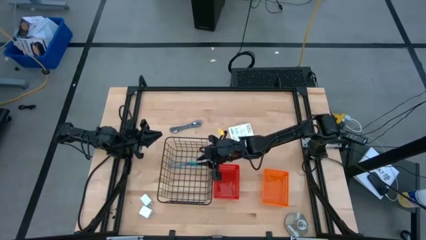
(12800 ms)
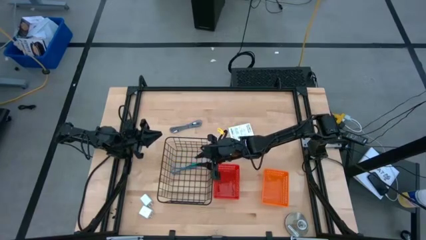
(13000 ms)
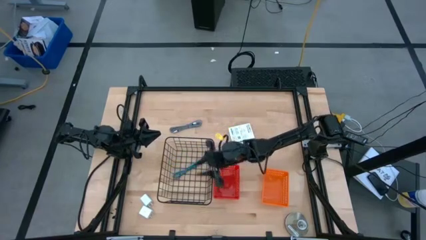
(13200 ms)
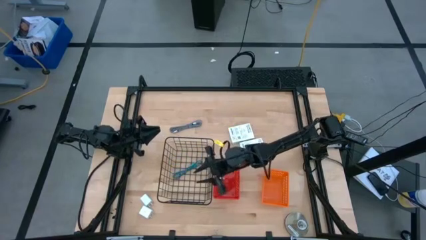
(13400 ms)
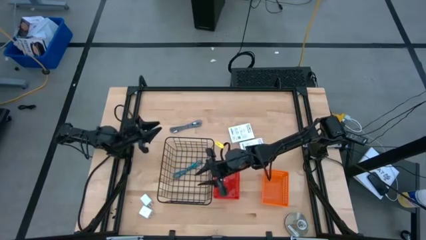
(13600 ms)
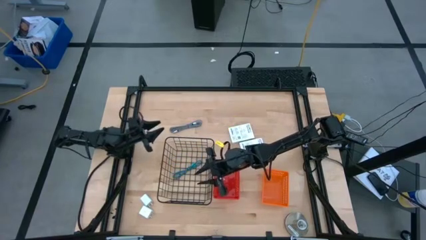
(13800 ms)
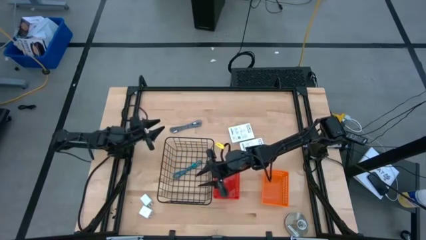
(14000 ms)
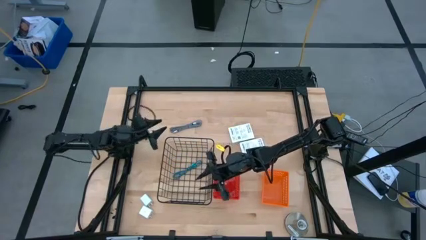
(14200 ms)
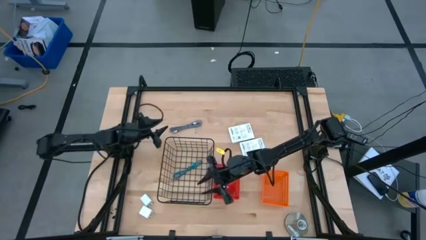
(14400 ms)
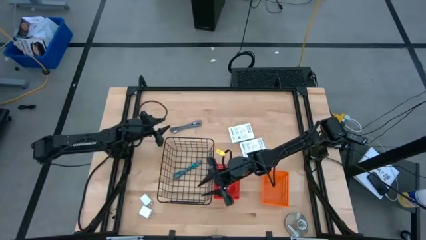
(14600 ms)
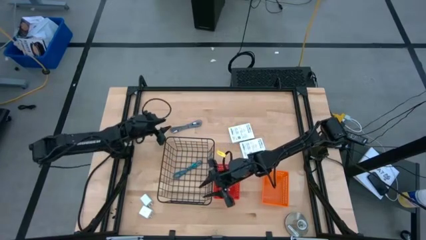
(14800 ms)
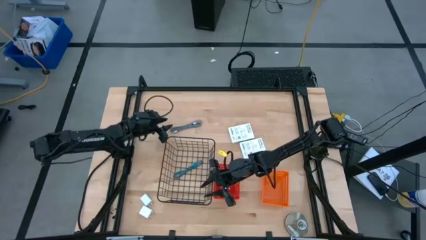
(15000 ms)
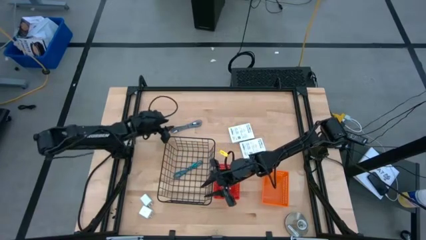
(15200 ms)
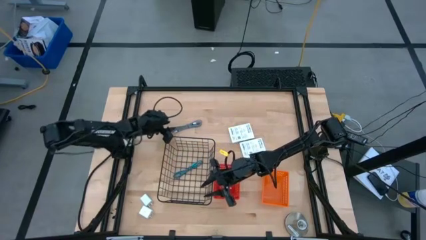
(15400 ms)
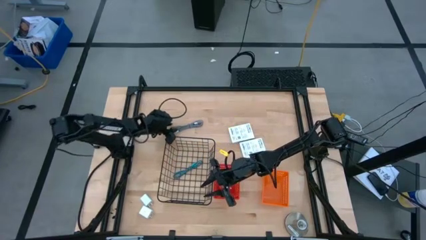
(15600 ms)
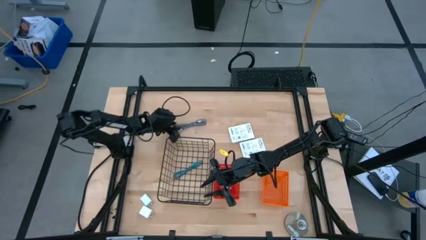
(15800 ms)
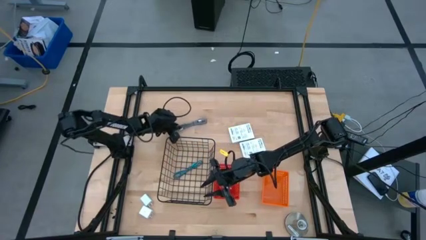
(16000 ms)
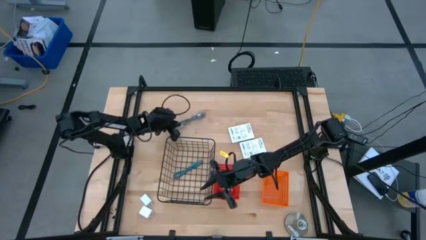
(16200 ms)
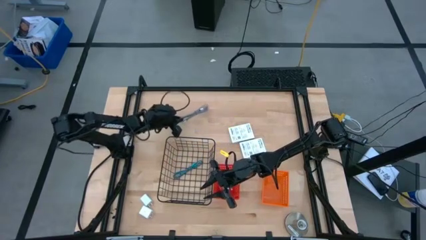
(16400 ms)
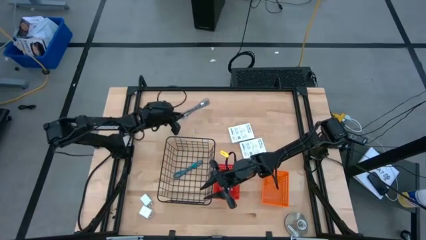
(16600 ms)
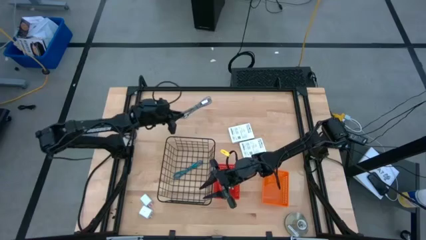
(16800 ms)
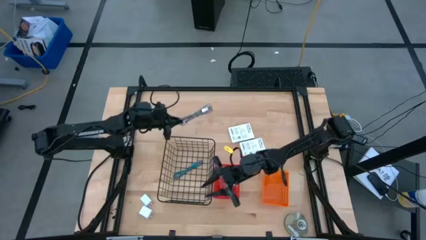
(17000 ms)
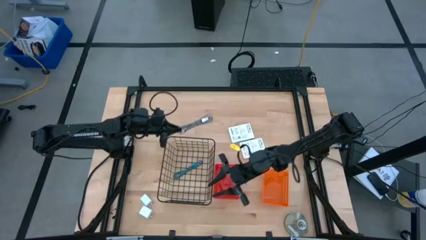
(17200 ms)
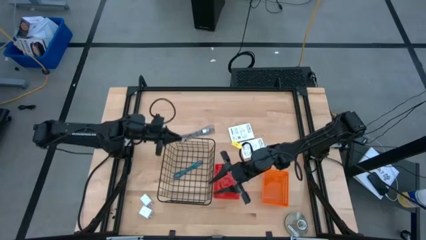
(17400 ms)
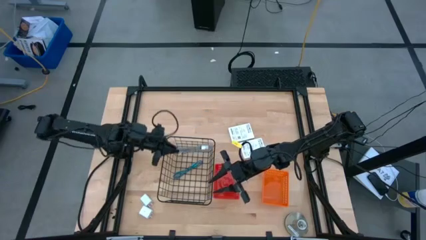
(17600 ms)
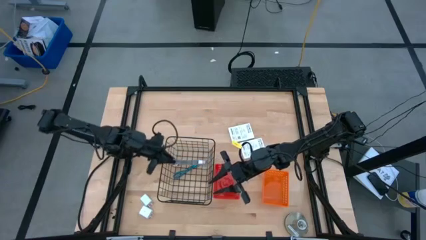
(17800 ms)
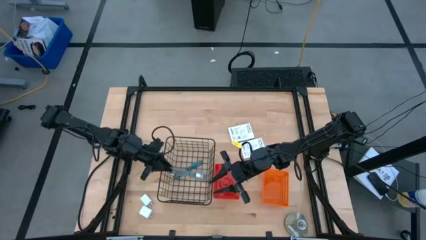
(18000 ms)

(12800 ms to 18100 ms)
Task: Pick and place items into bin
Put the gray charger cable into the wire basket

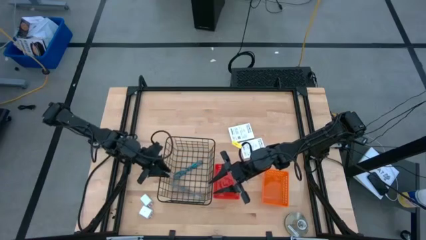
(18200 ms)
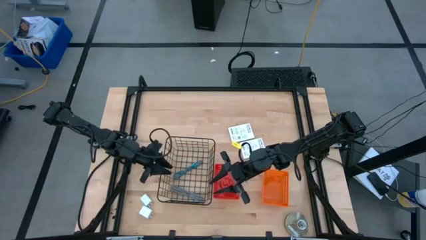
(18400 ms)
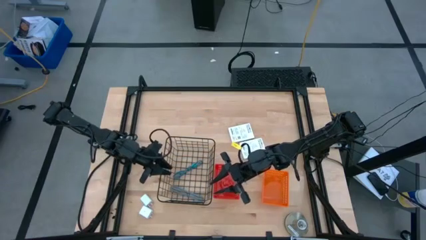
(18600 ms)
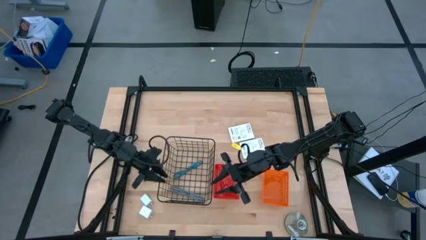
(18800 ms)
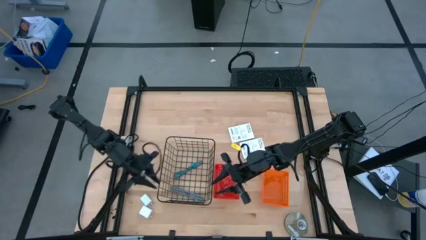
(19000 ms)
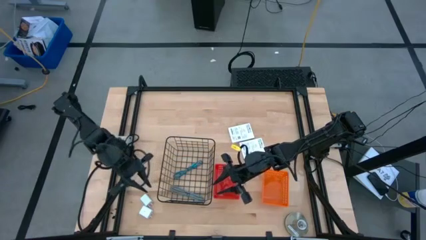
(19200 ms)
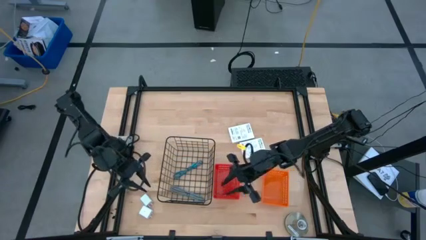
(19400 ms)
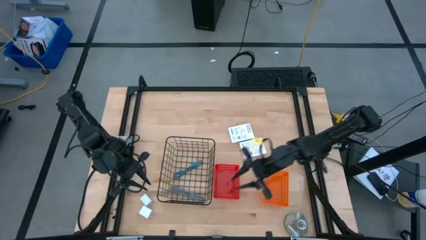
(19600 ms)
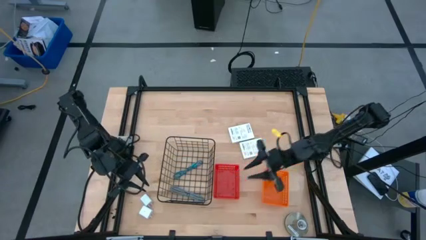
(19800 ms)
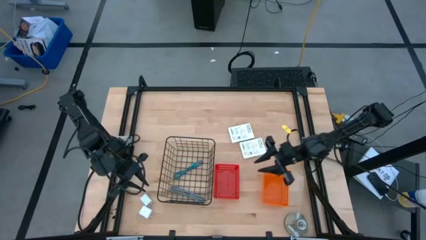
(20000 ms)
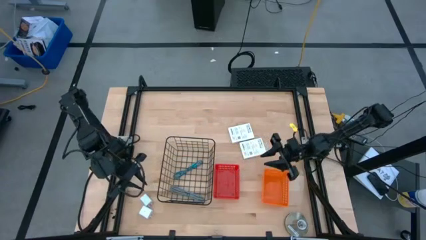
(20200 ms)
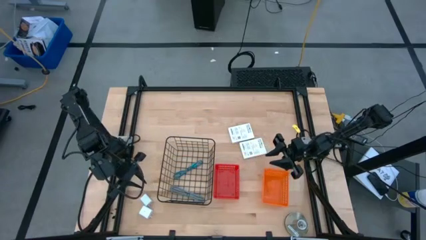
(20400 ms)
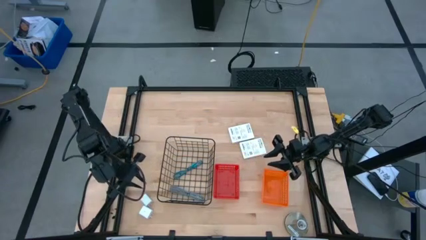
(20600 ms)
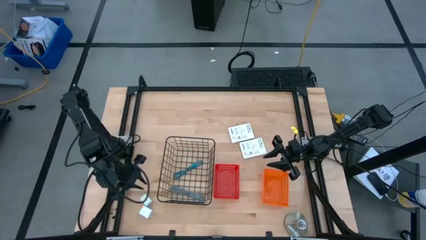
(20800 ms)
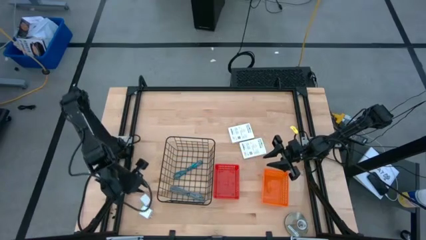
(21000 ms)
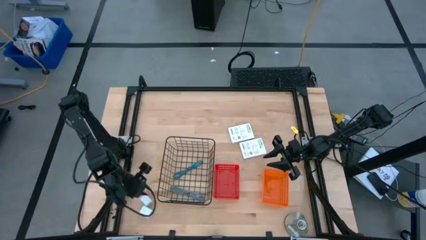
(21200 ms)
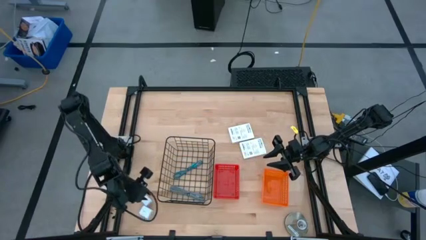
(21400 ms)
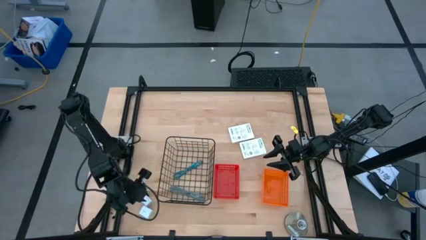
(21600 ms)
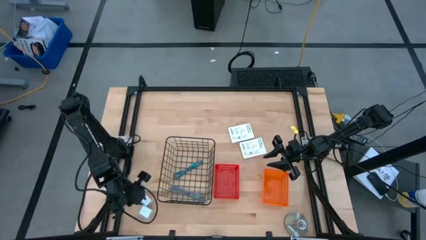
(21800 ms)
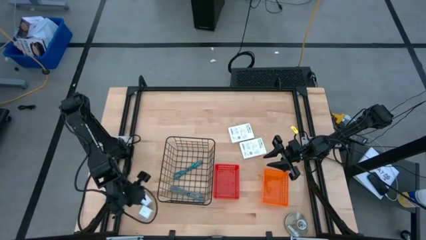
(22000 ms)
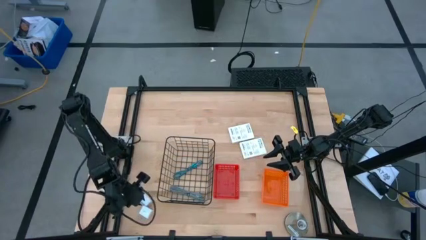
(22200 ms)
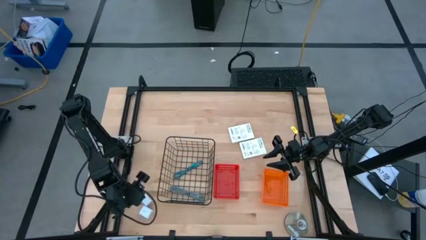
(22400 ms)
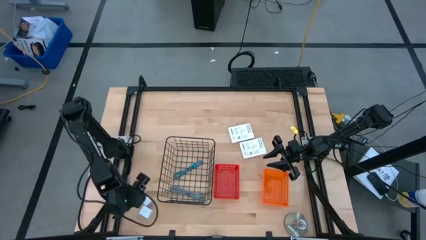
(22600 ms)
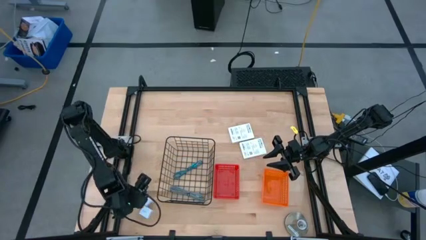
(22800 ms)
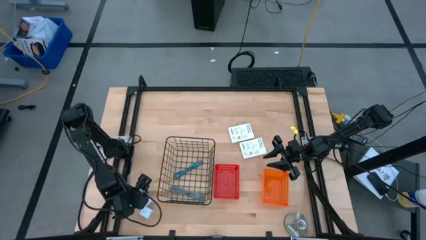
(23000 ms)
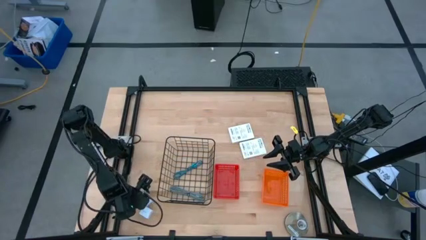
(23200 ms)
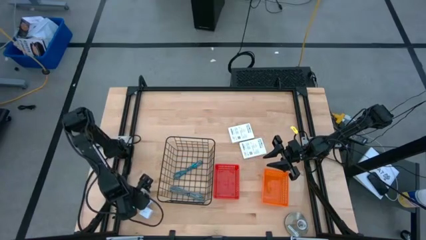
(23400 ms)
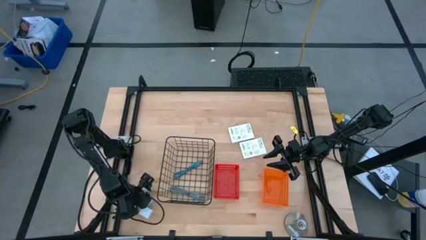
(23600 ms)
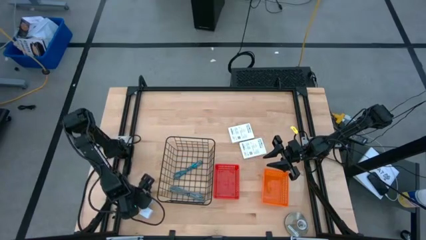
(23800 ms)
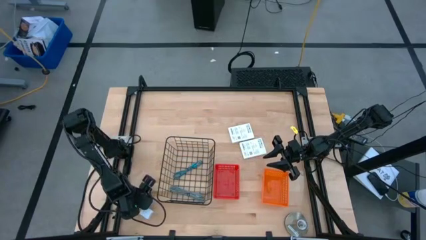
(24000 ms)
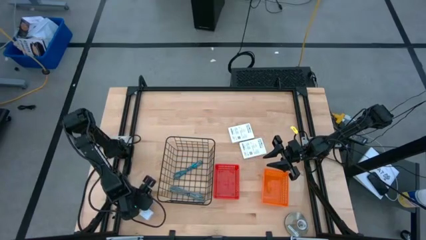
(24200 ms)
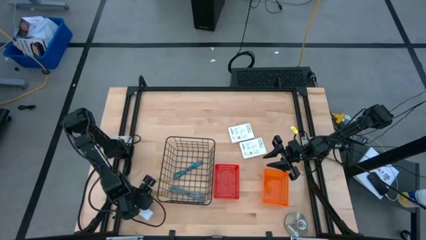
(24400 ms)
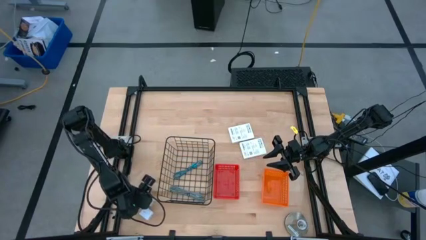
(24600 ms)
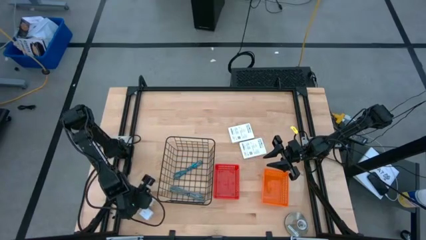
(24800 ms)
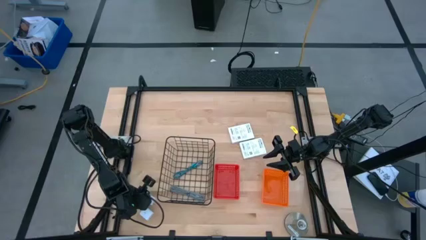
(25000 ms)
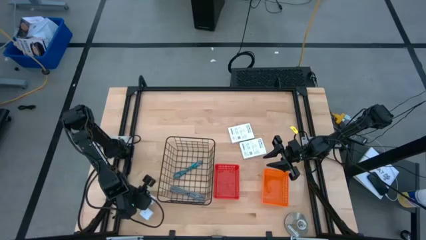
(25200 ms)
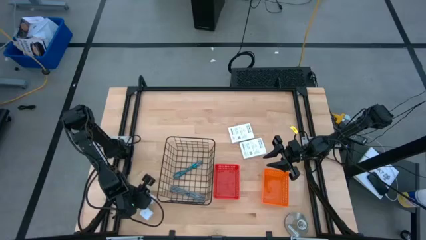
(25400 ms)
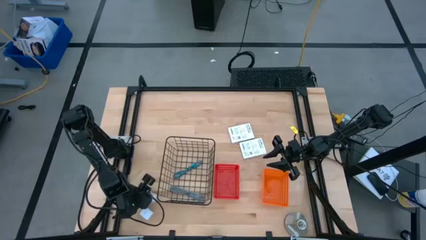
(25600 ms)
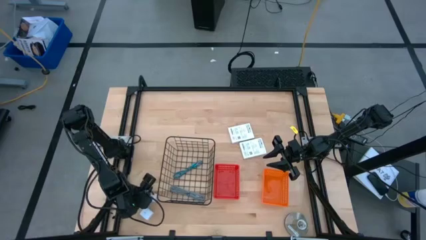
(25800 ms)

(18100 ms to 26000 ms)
Put the top white charger adapter into the red basket

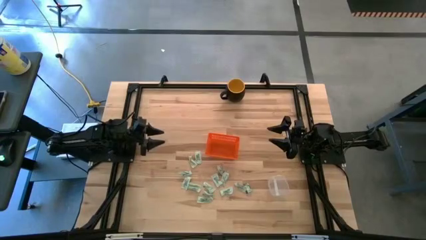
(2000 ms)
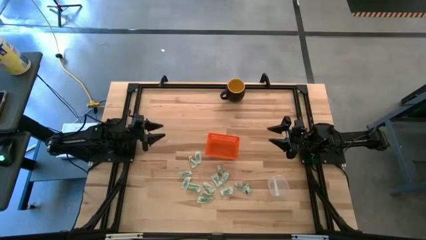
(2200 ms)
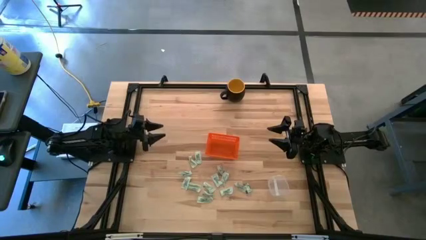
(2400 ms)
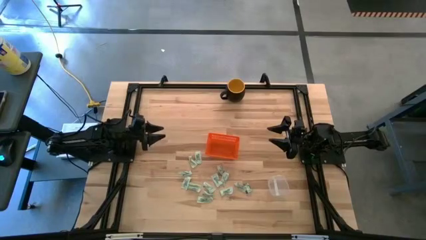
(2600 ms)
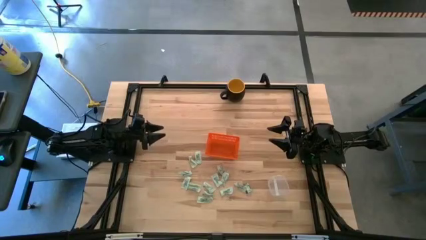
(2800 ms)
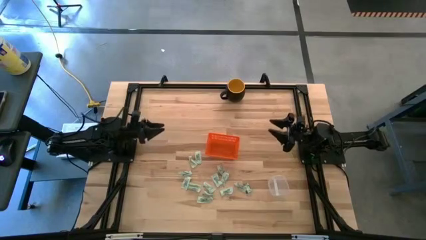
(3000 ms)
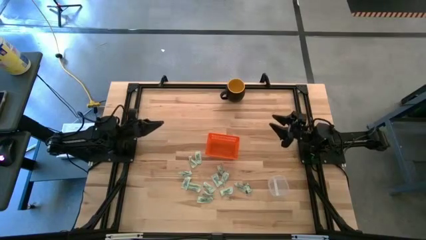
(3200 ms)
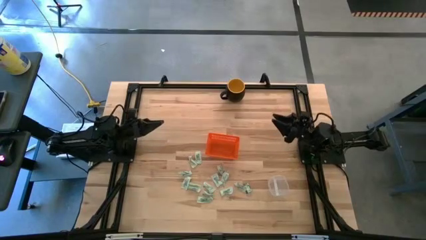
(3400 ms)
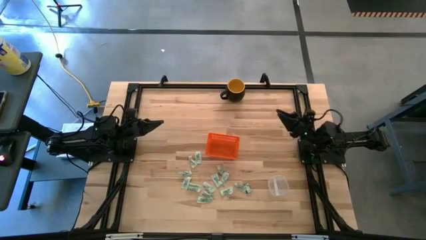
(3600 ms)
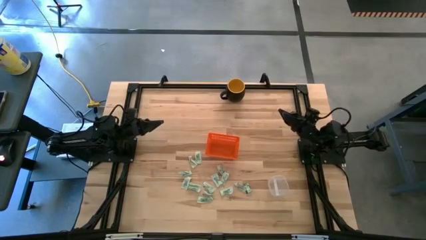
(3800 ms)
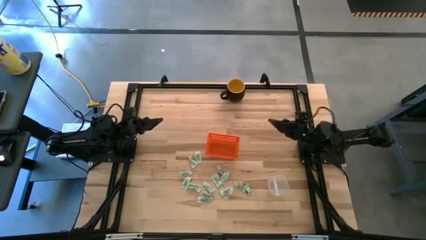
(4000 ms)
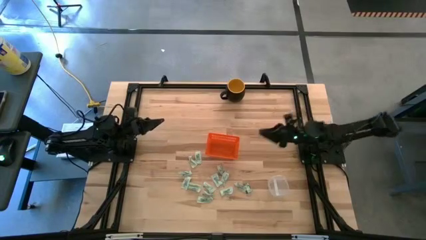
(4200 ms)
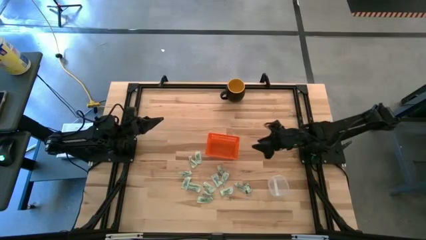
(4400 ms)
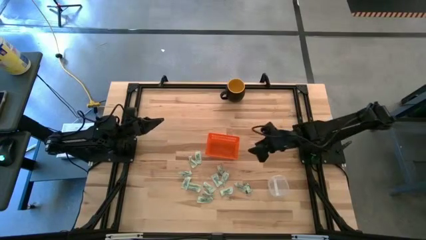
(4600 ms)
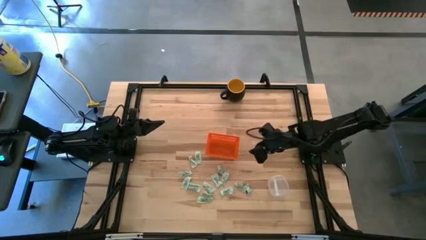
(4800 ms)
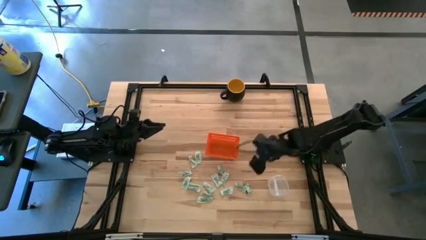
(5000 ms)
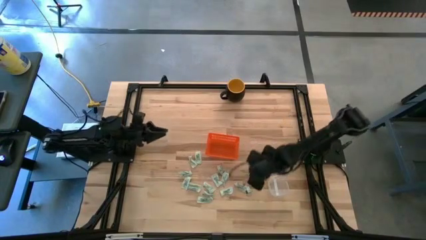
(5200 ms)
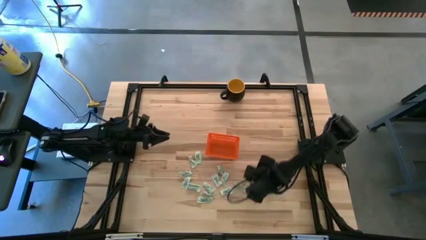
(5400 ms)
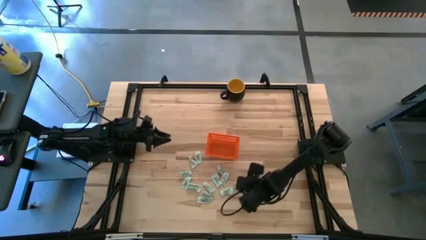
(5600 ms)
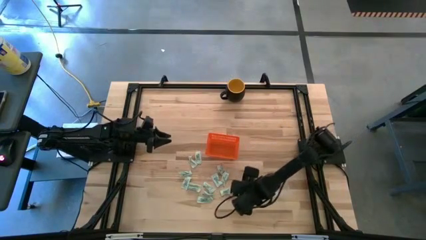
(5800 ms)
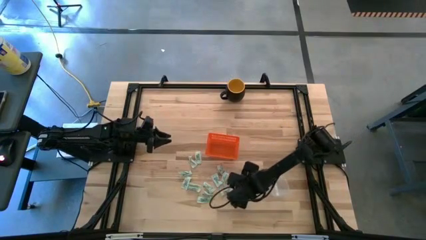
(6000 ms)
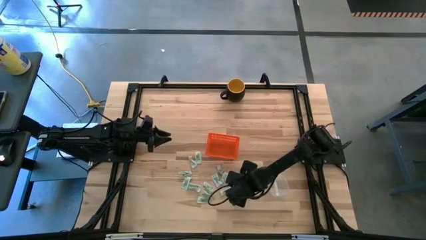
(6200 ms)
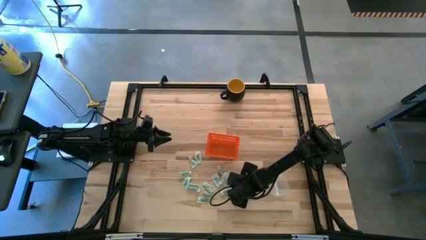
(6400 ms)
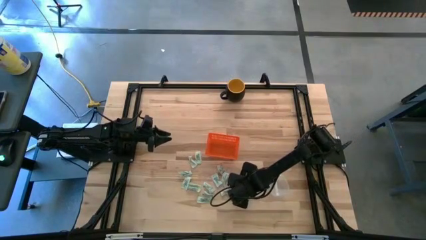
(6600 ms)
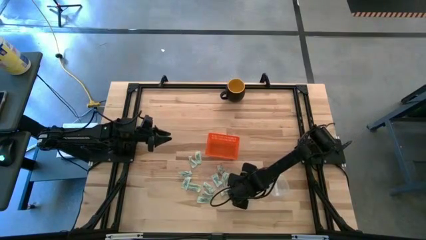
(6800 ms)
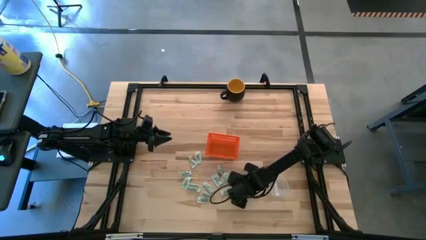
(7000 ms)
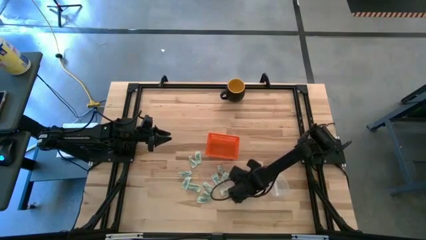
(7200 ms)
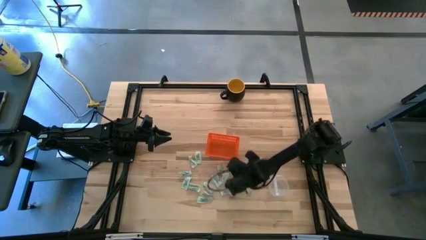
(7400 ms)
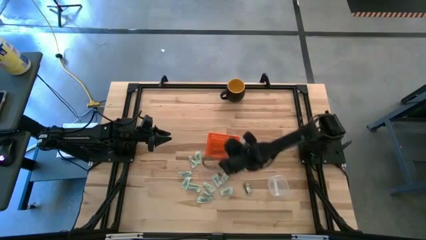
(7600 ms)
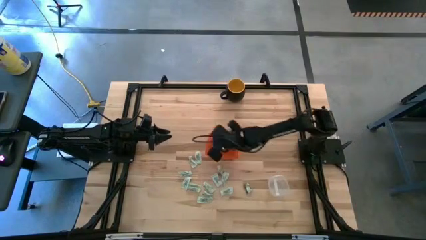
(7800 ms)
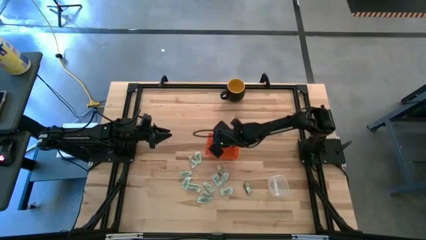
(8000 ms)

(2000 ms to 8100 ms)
Task: Pick and place items into bin
Put the light green stevia packet into the orange bin
